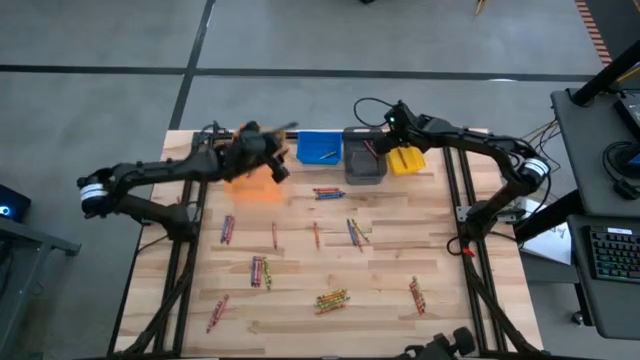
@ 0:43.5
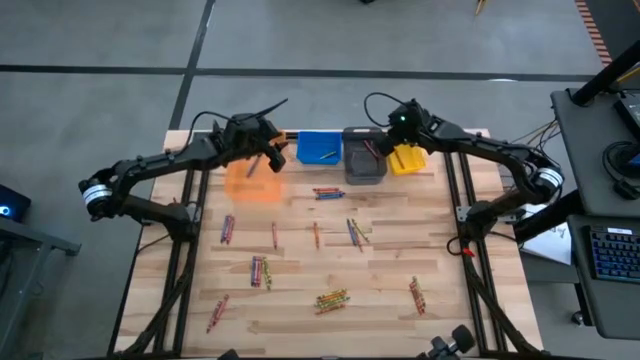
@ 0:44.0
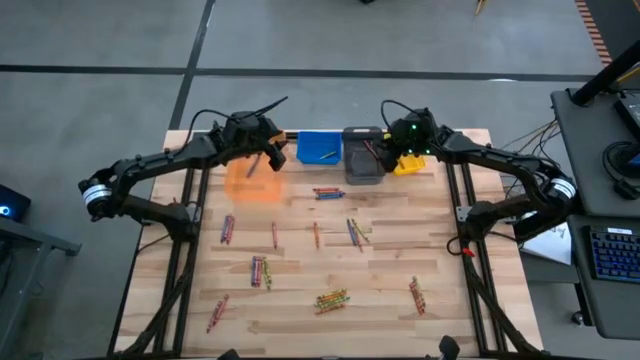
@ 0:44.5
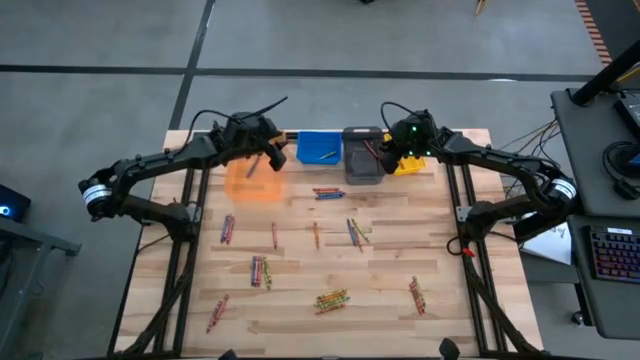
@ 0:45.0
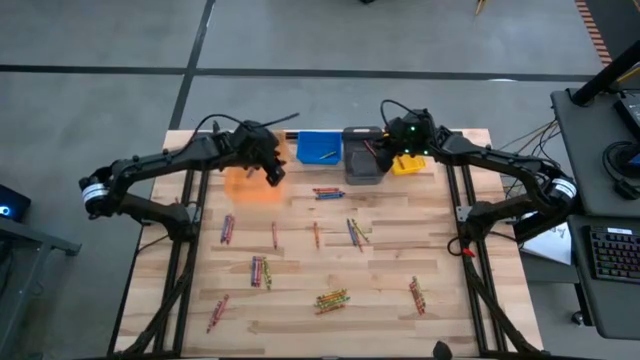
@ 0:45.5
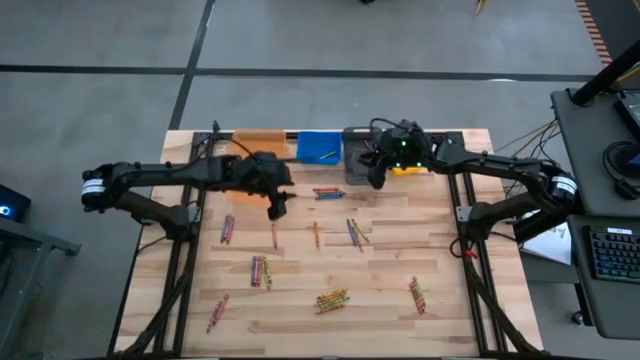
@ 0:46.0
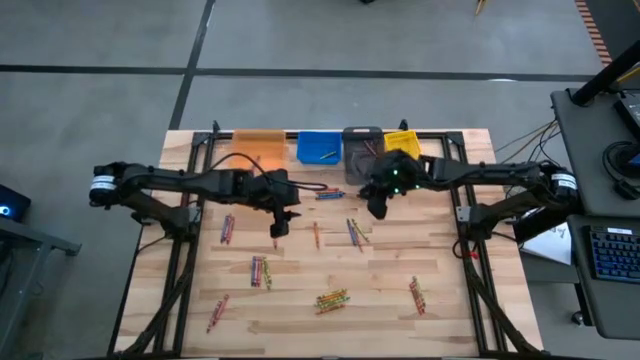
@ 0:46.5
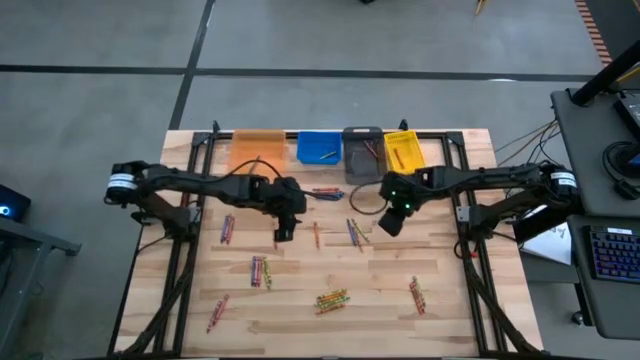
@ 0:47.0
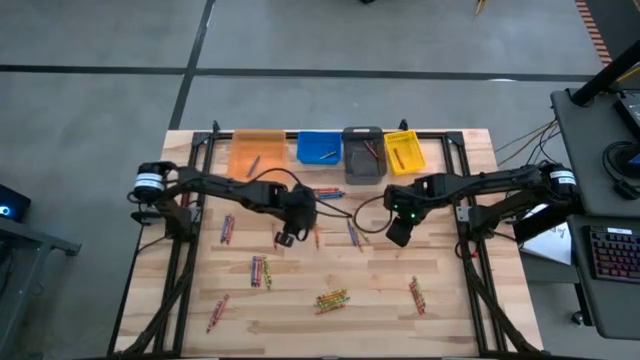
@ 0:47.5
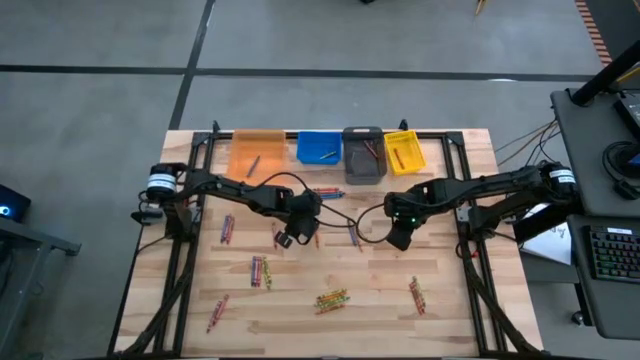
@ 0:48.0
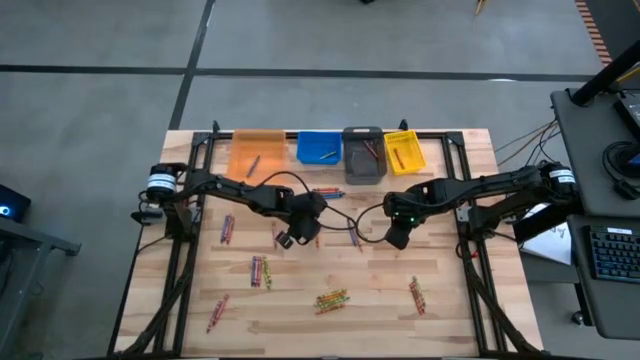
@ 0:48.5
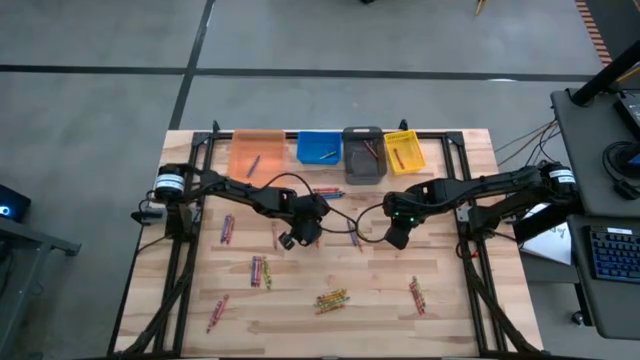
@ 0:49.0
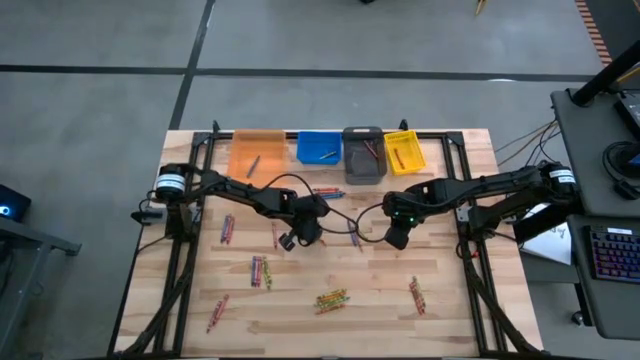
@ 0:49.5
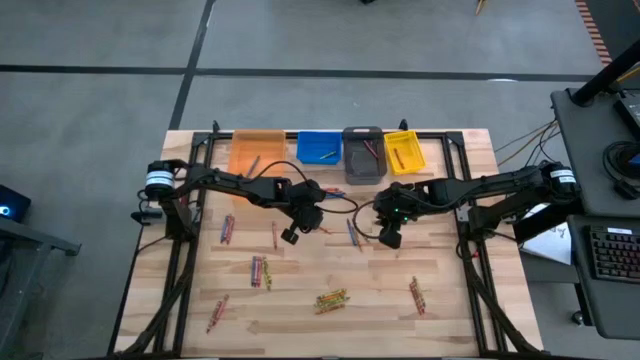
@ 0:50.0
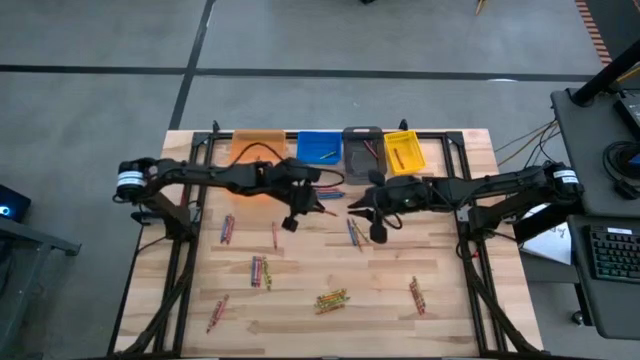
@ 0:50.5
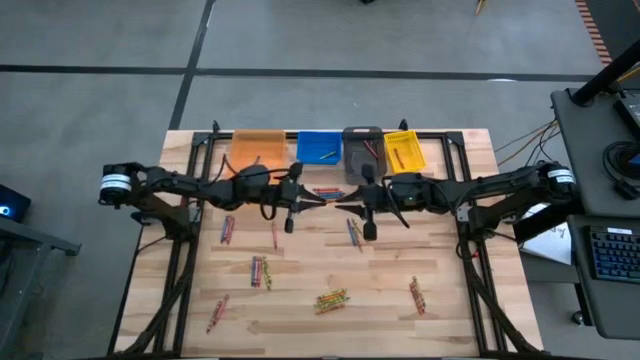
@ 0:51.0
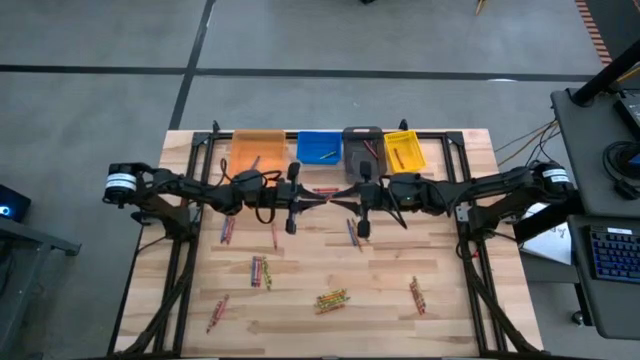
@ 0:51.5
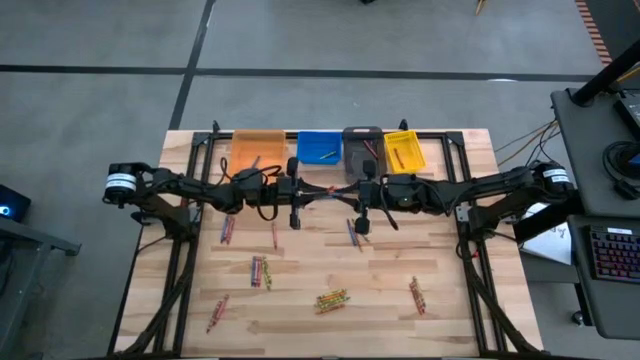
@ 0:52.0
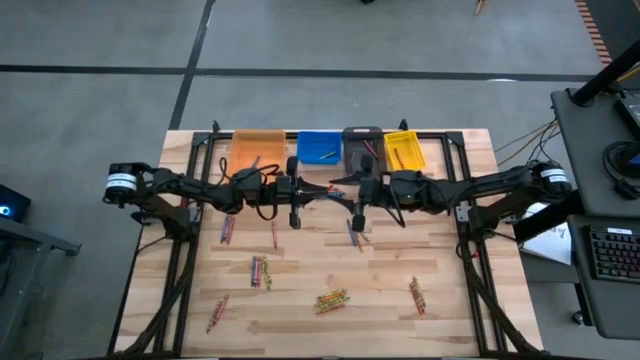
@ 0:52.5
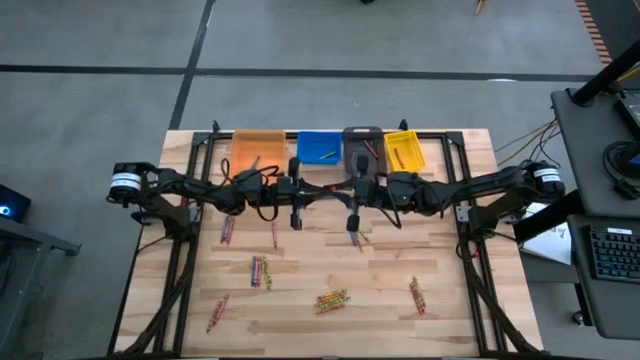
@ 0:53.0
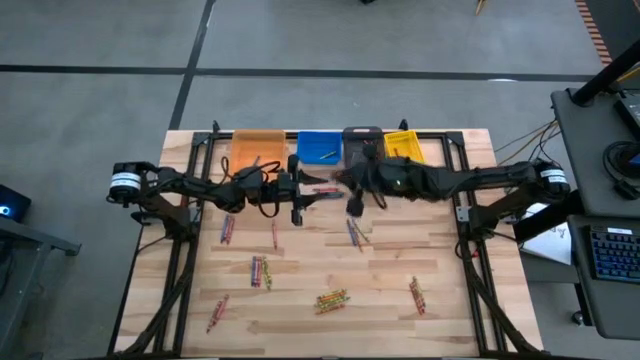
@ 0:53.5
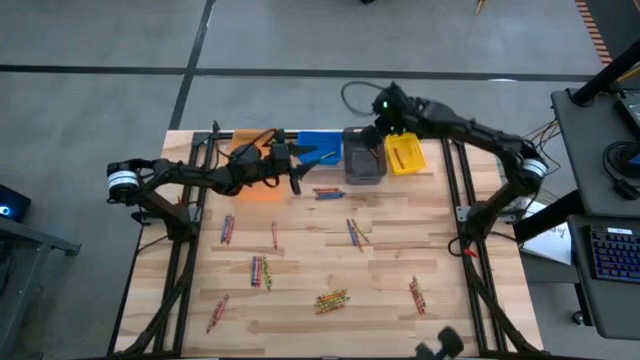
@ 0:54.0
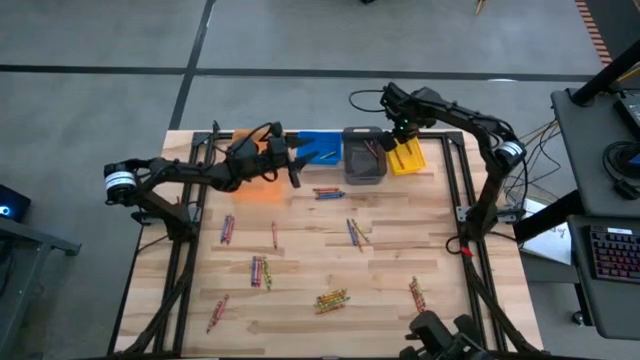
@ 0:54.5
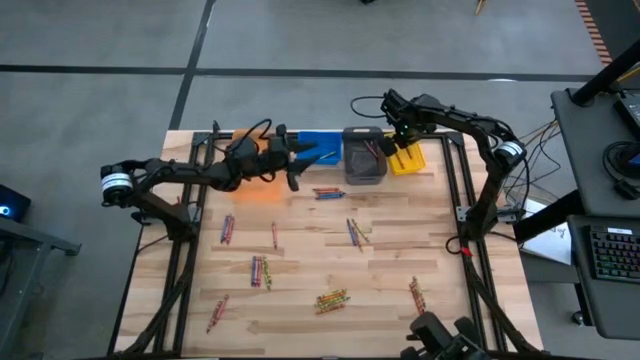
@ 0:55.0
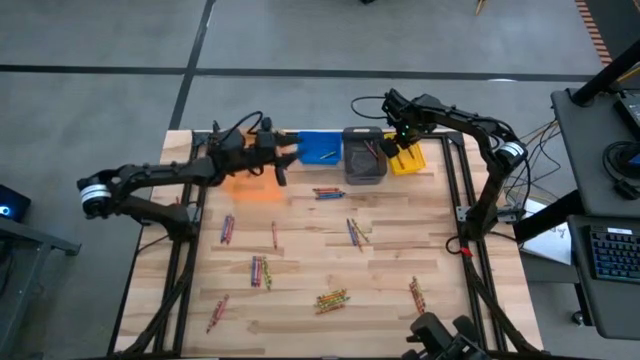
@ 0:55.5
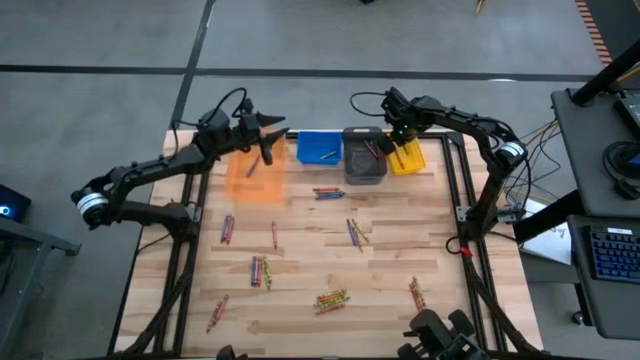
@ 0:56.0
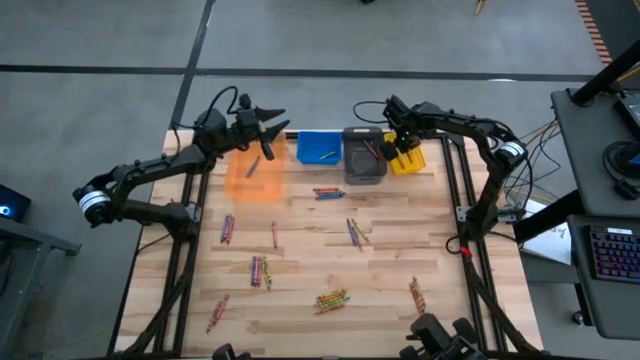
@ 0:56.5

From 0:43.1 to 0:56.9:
Task: Sort crayons
Put the orange crayon into the yellow bin

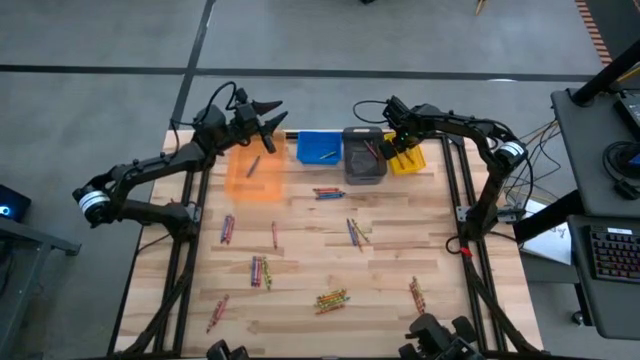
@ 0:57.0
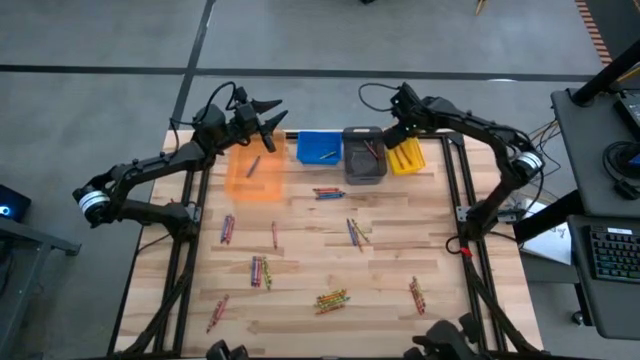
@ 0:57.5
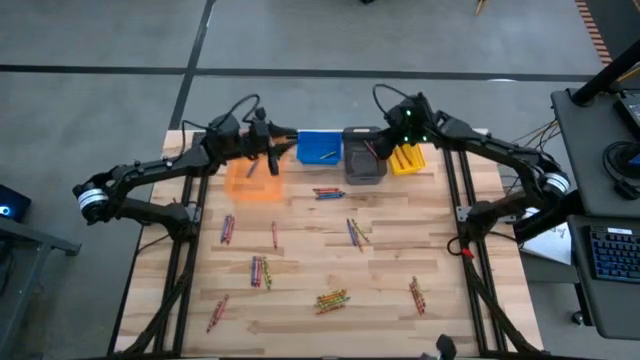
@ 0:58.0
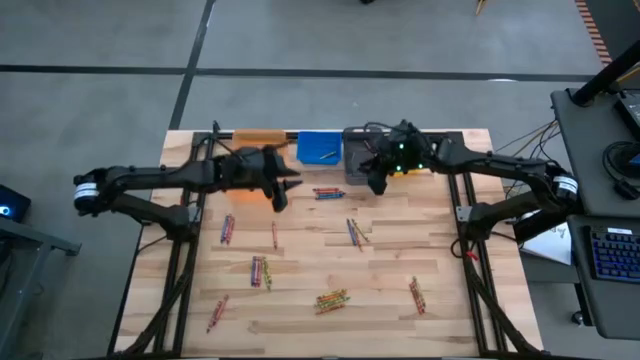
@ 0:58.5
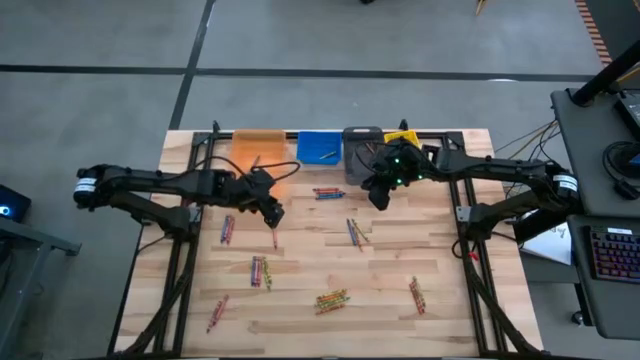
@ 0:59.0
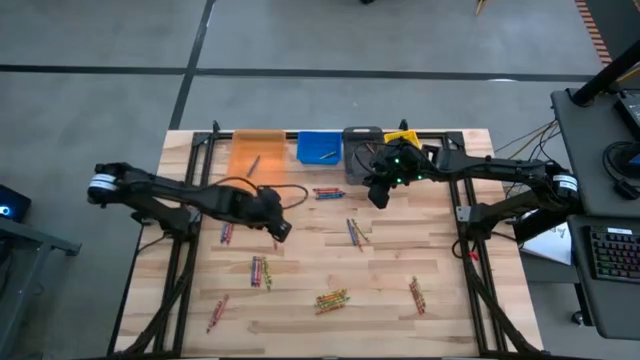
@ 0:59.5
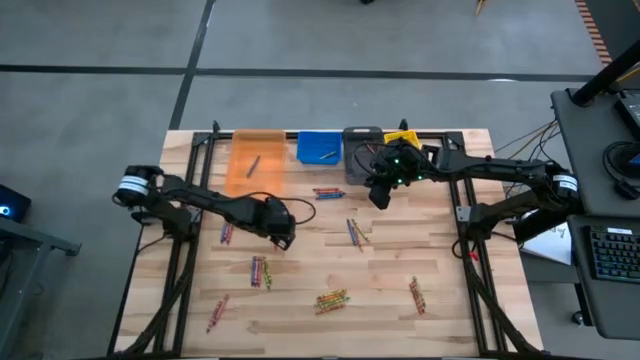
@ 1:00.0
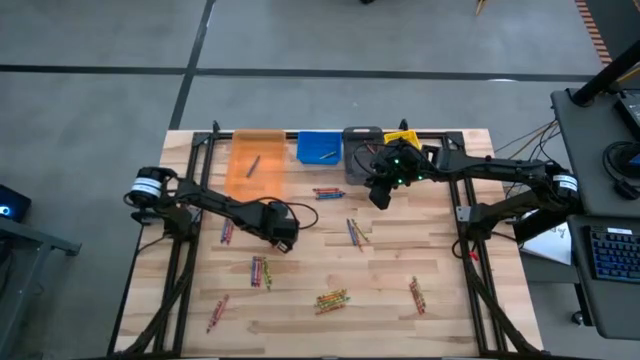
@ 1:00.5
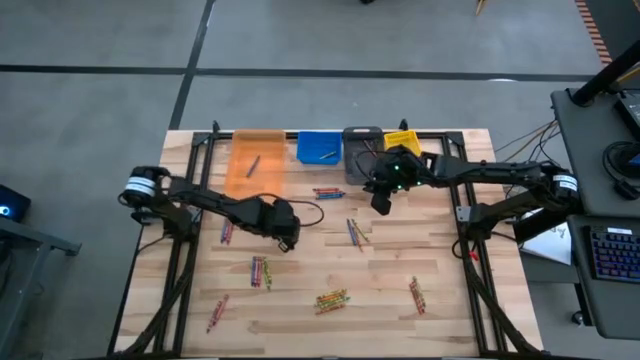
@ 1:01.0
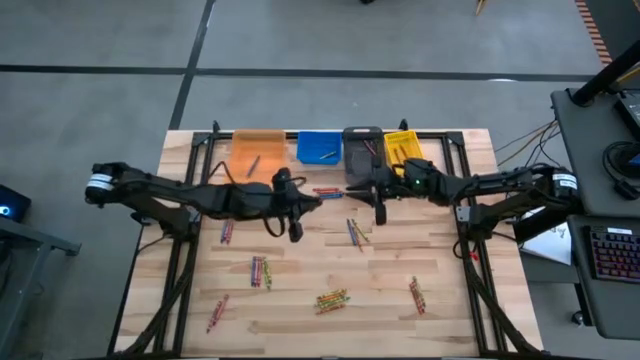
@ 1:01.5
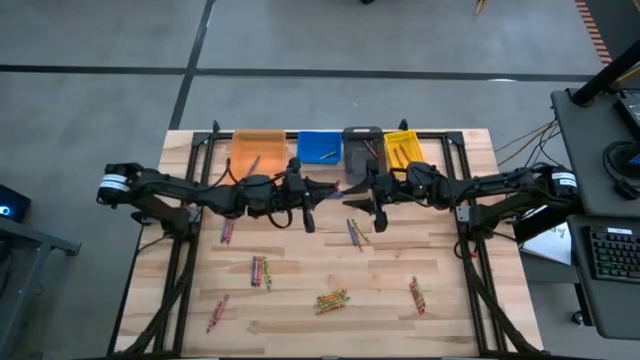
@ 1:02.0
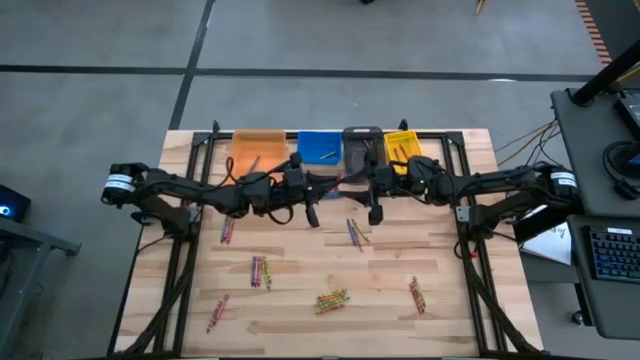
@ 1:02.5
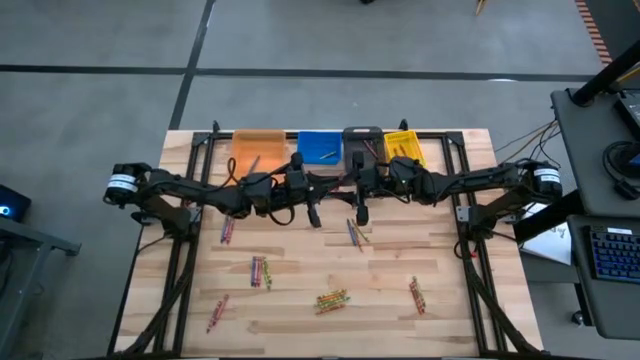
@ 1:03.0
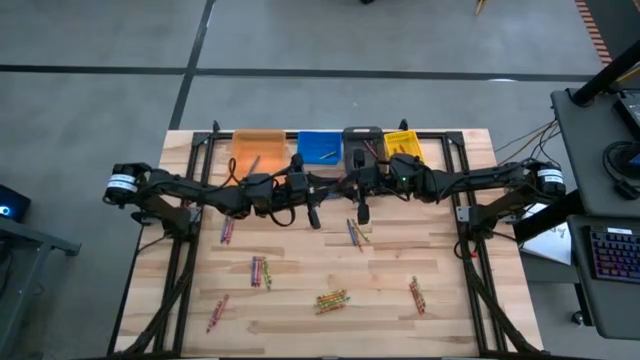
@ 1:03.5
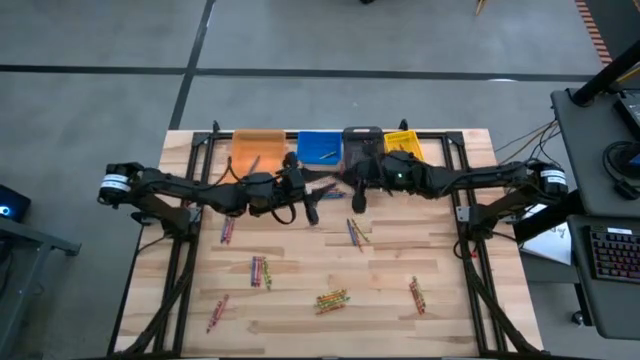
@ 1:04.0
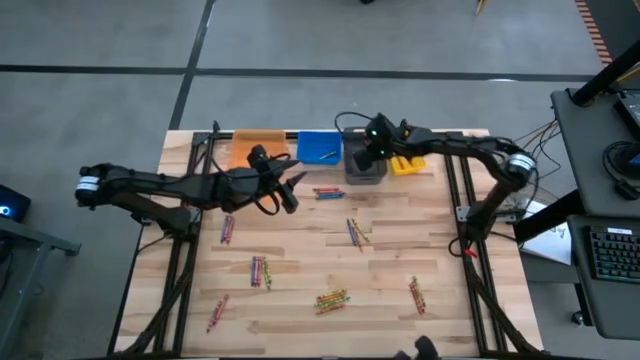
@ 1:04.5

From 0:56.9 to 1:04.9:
Put the red crayon into the black bin
